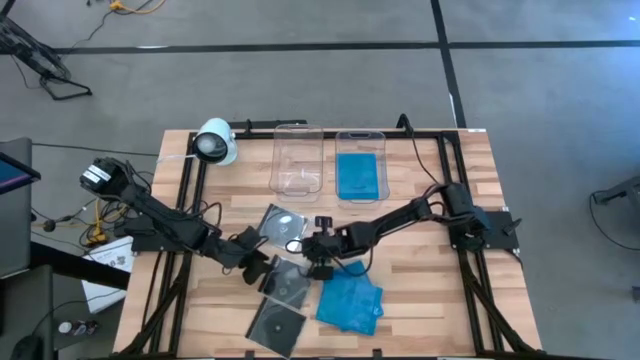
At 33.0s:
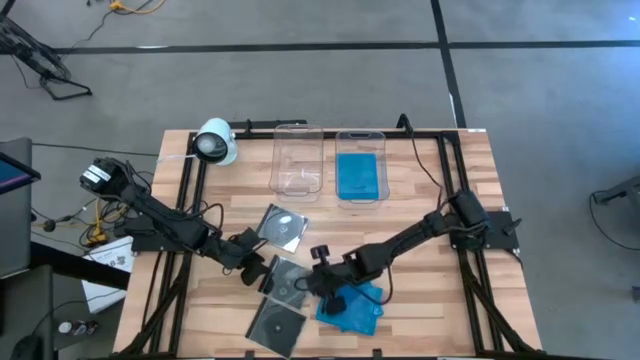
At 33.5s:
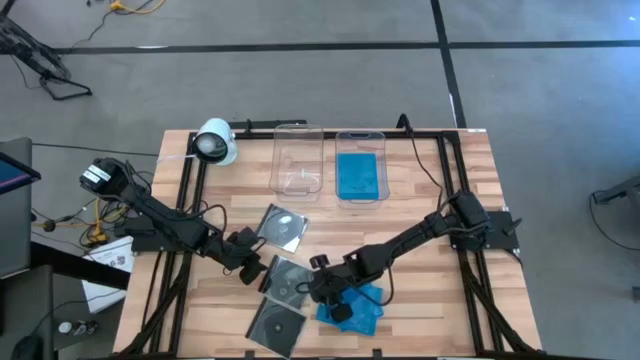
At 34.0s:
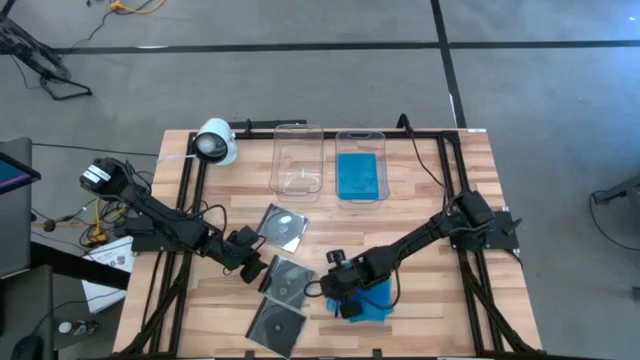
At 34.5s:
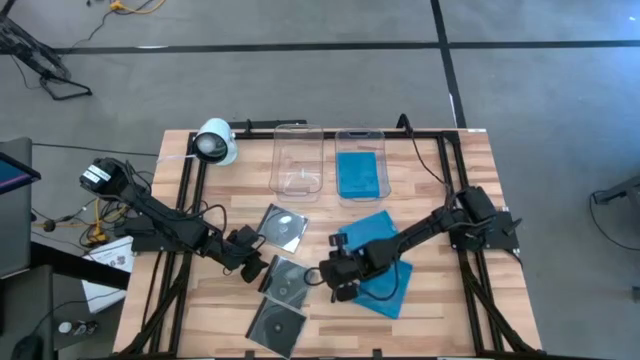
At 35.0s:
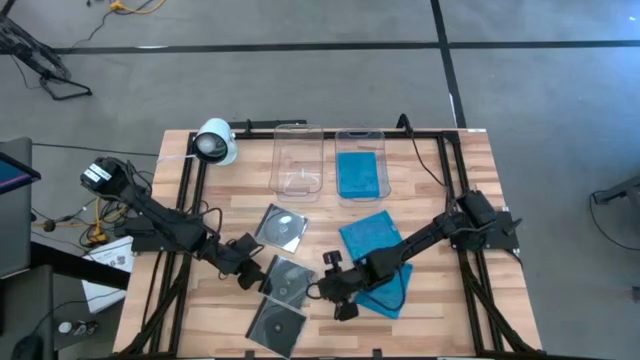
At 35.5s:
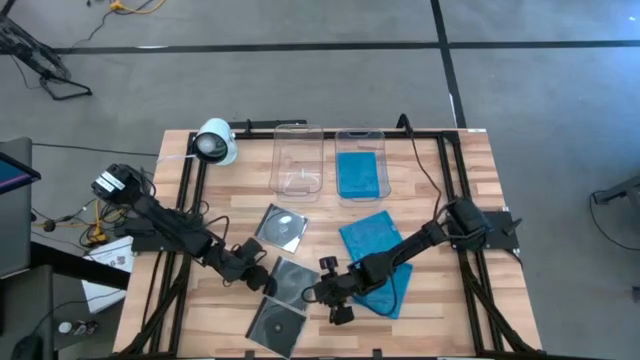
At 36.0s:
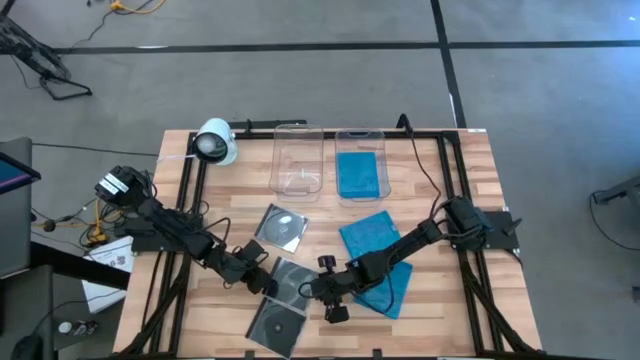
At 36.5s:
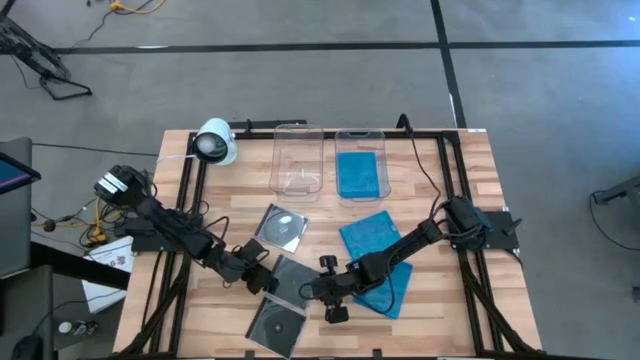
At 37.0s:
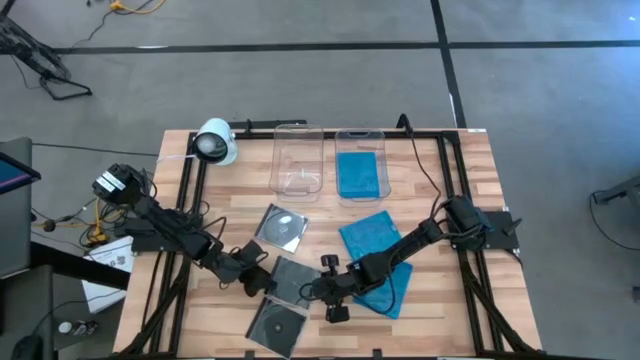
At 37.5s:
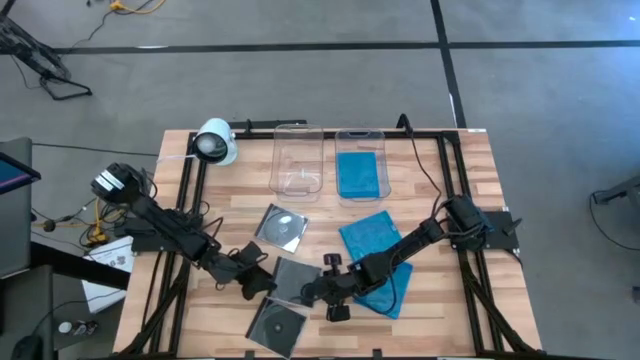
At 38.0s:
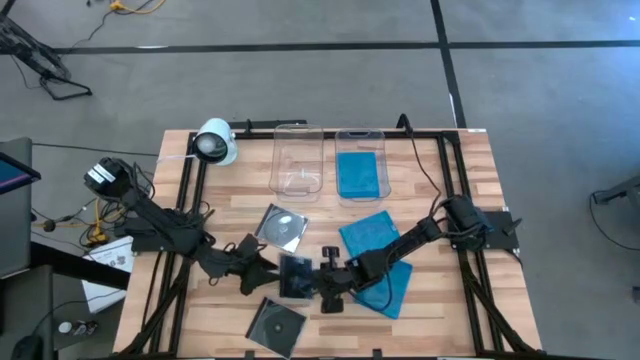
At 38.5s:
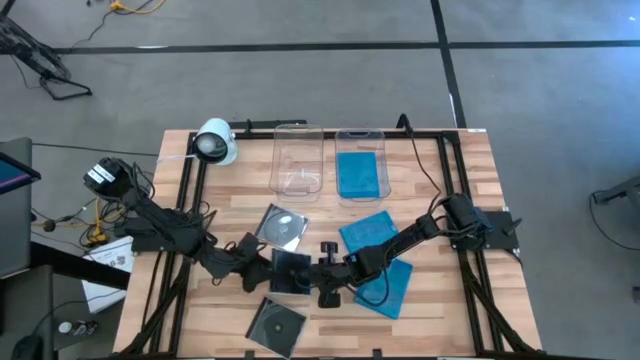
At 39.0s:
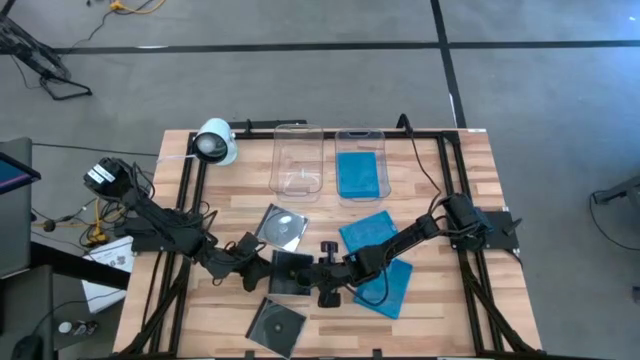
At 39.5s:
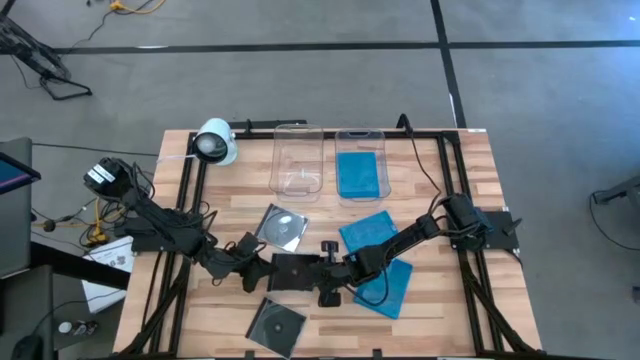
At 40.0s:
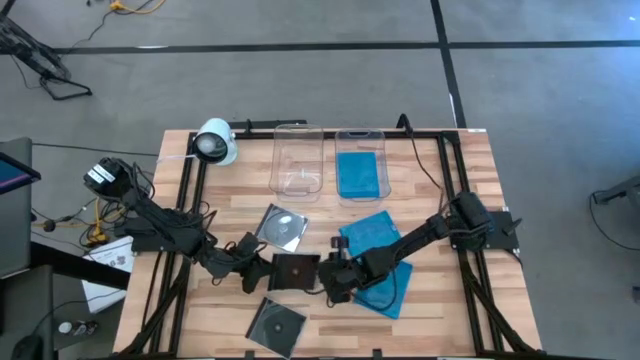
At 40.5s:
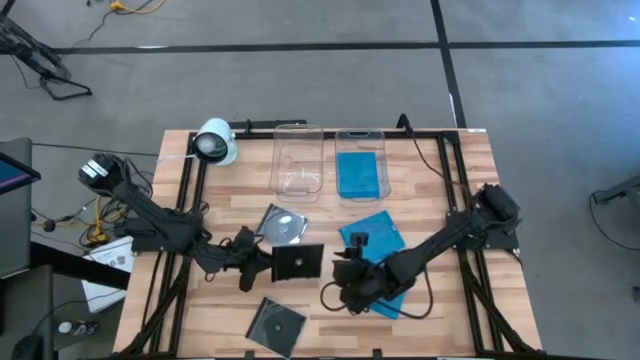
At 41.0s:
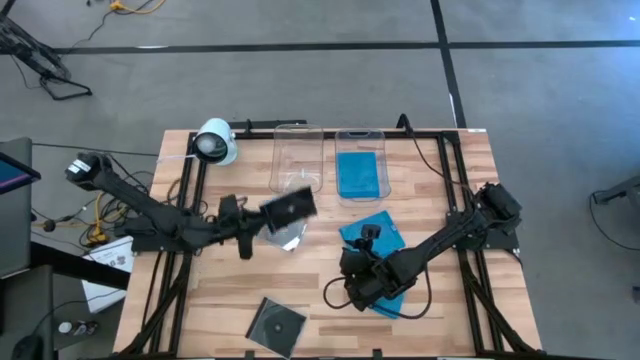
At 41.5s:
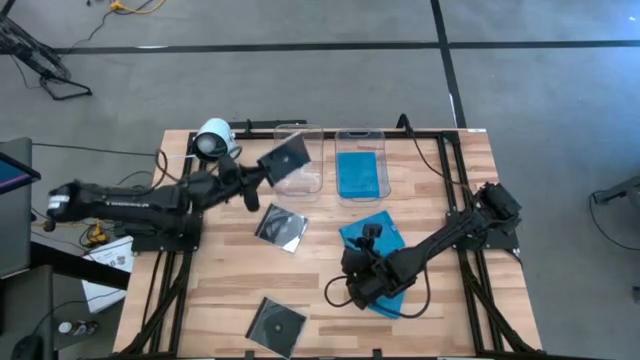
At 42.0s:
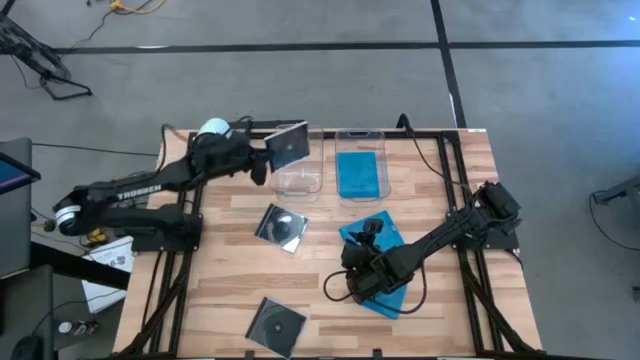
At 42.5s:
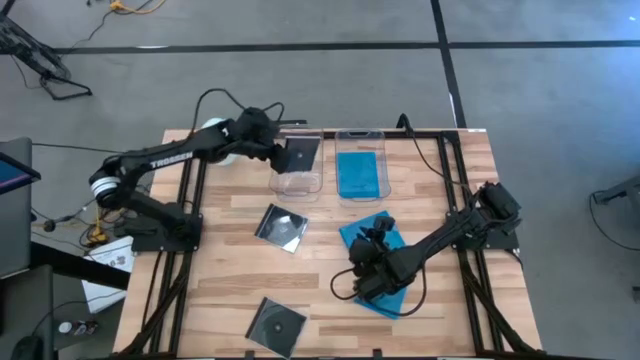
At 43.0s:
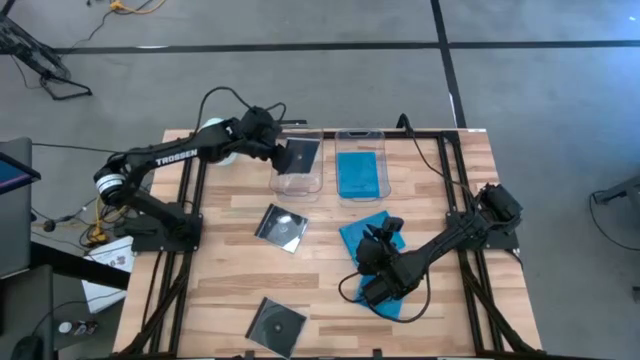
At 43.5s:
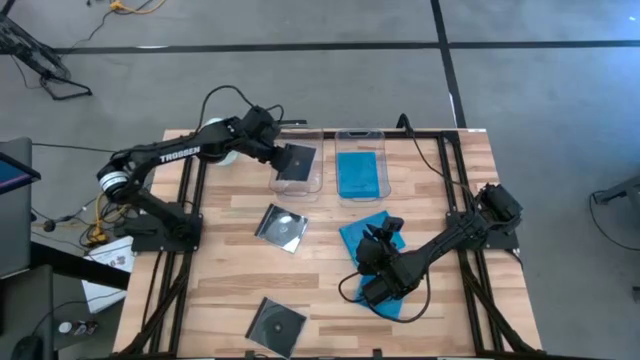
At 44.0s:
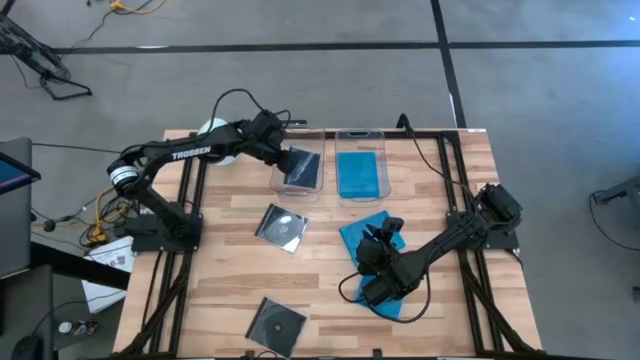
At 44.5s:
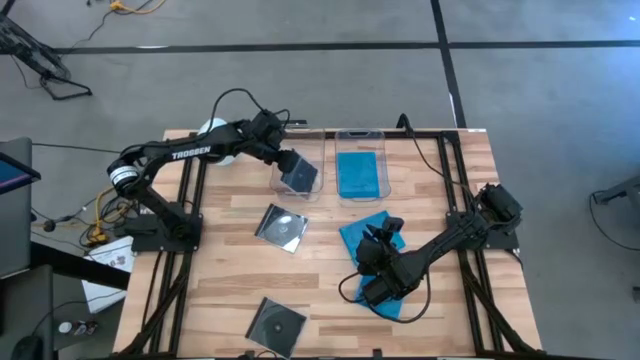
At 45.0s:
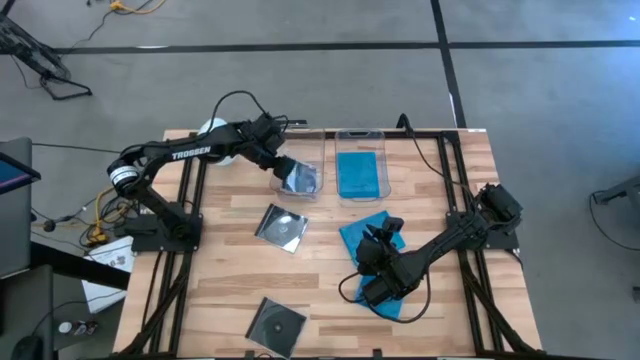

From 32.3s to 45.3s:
Task: Pick & place jewel cases by type
Put the middle black CD case into the left transparent bin

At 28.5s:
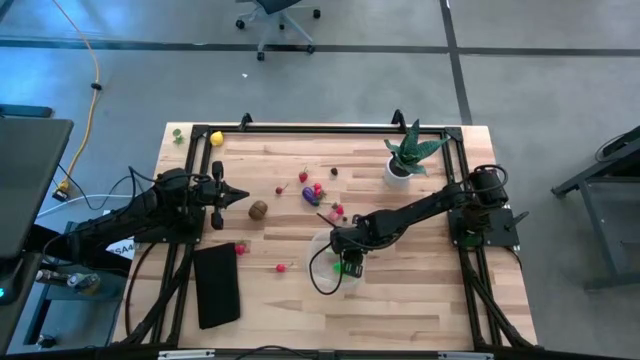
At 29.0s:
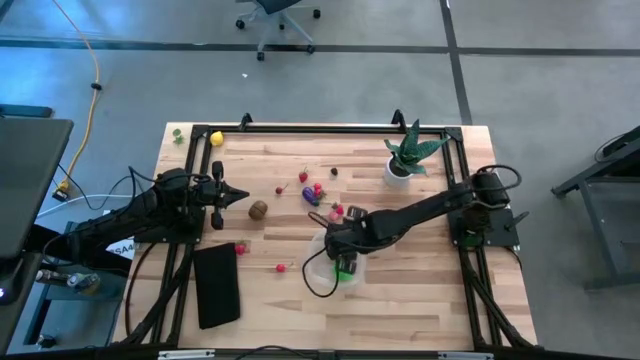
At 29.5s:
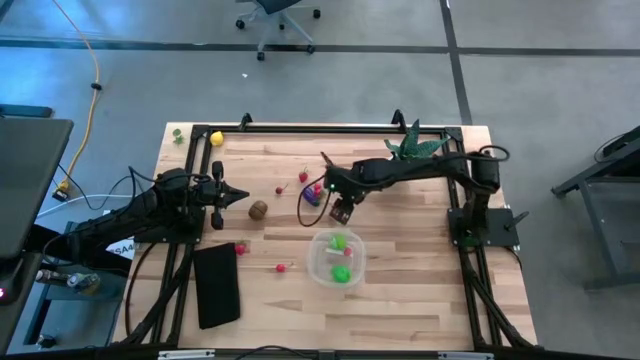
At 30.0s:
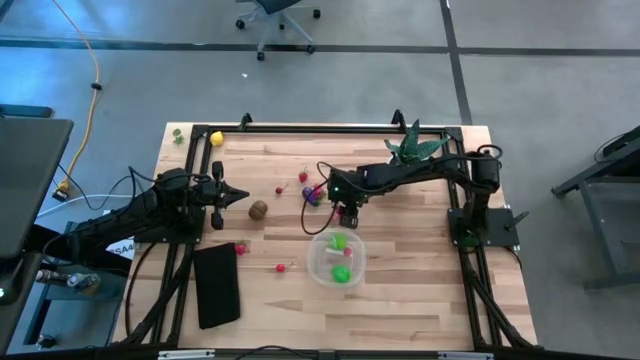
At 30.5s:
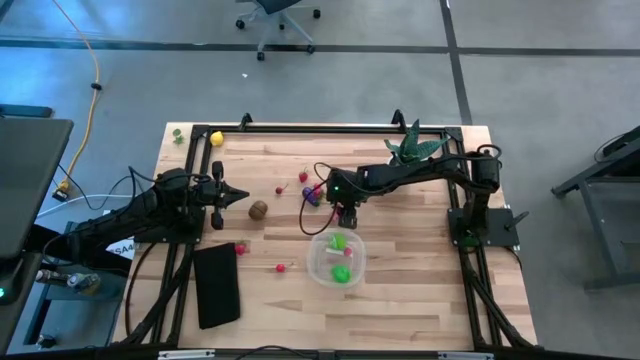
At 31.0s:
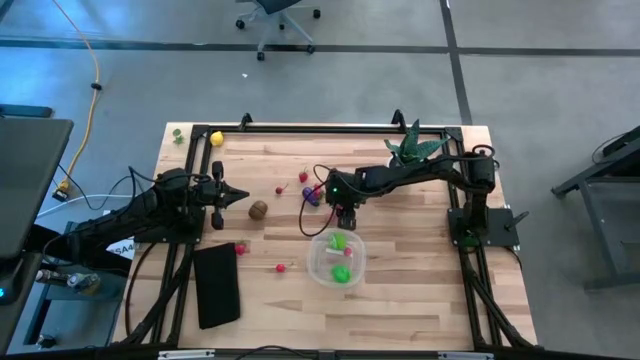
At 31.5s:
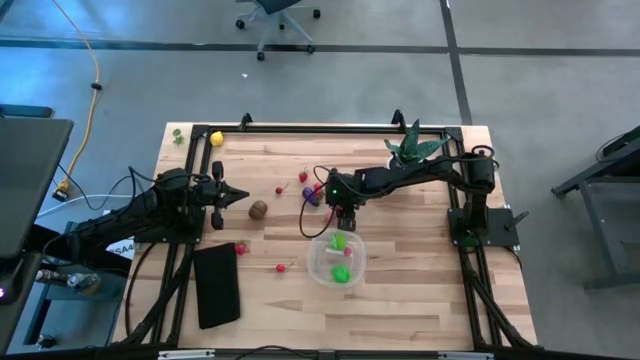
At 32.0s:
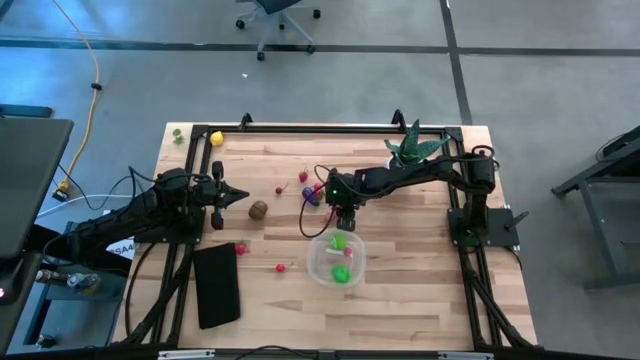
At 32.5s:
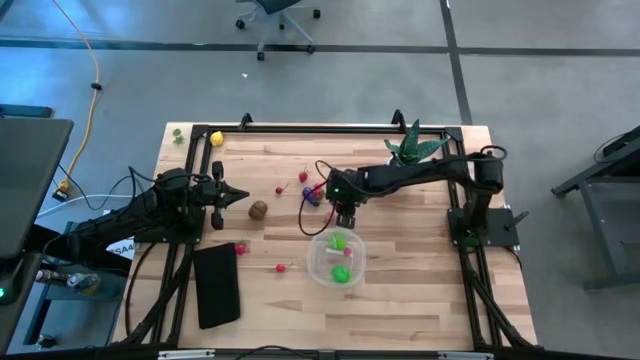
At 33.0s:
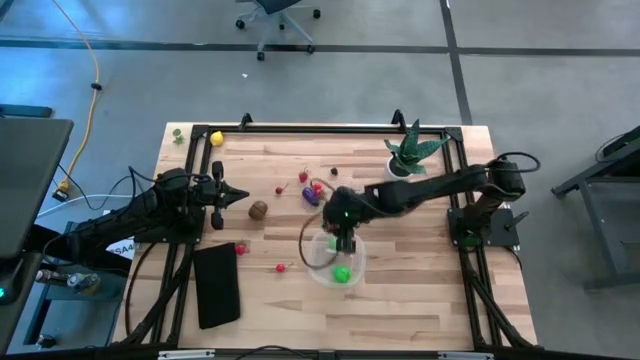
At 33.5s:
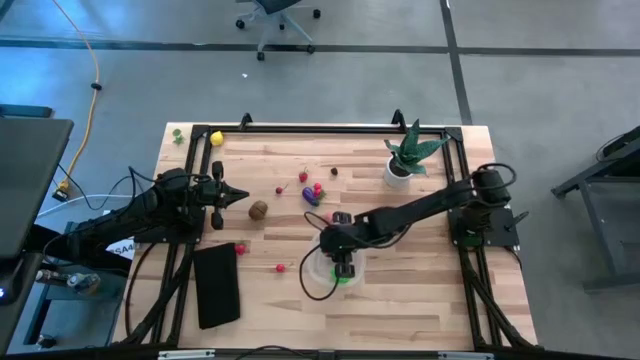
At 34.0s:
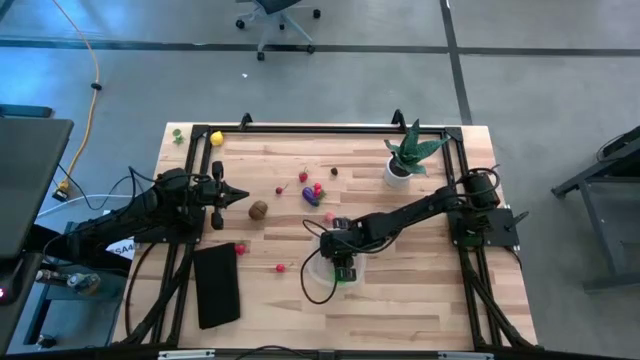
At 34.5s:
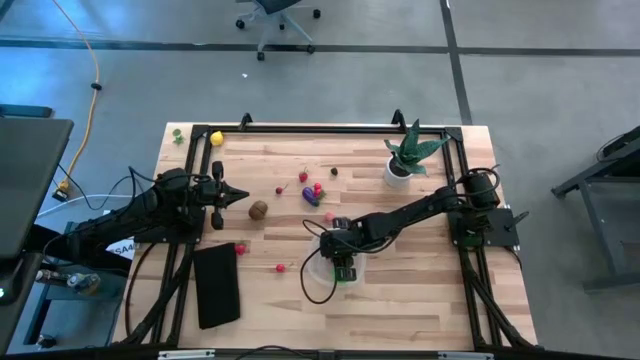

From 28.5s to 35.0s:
Task: Pick and placing Produce into tupperware
Put the red strawberry into the transparent container

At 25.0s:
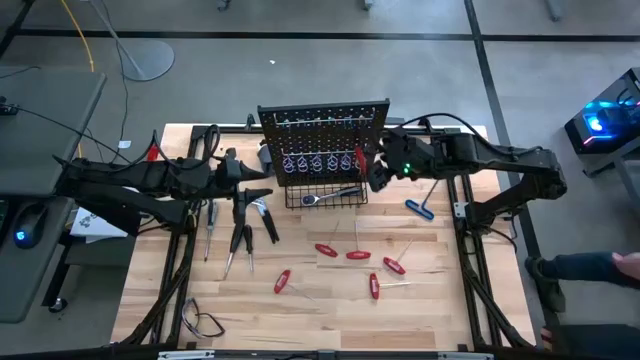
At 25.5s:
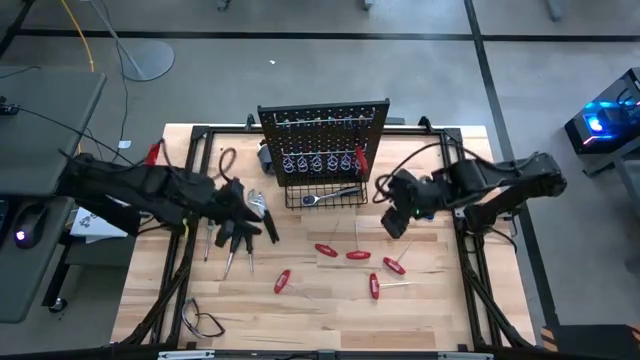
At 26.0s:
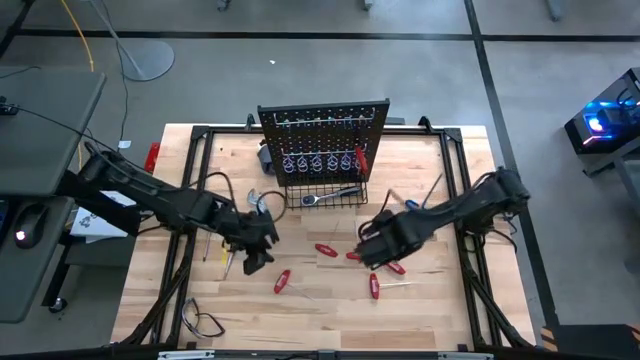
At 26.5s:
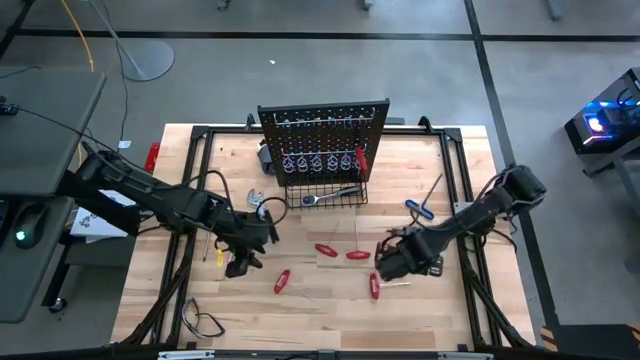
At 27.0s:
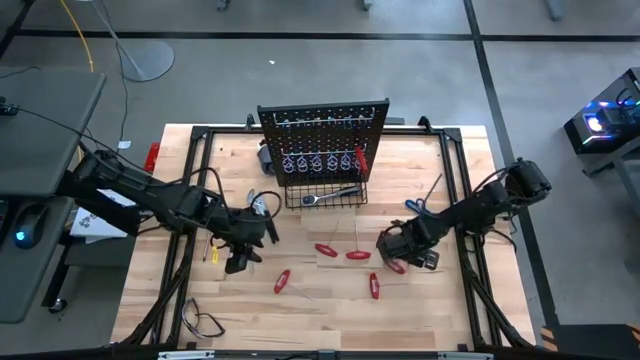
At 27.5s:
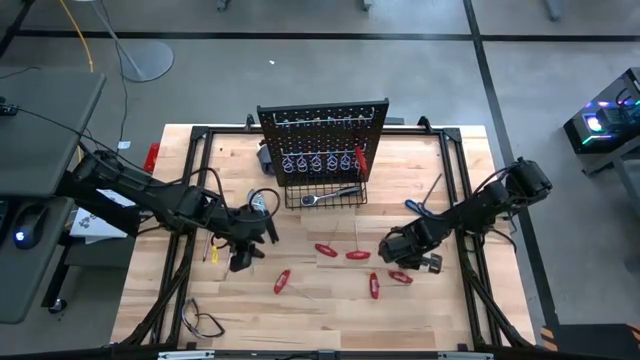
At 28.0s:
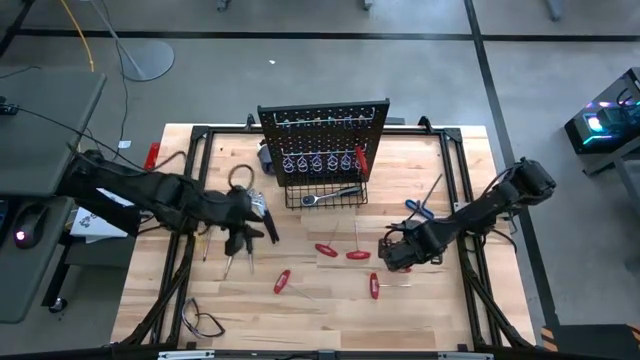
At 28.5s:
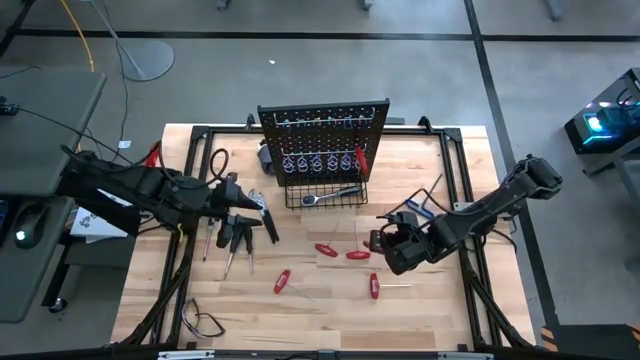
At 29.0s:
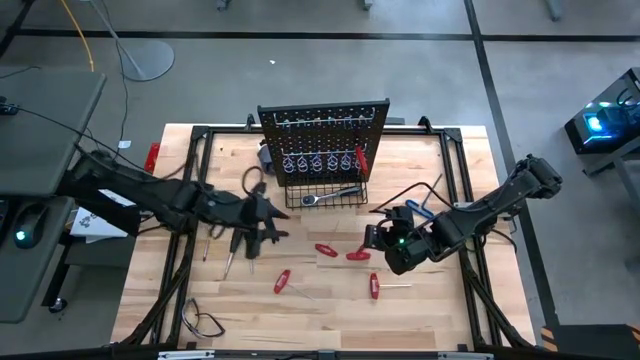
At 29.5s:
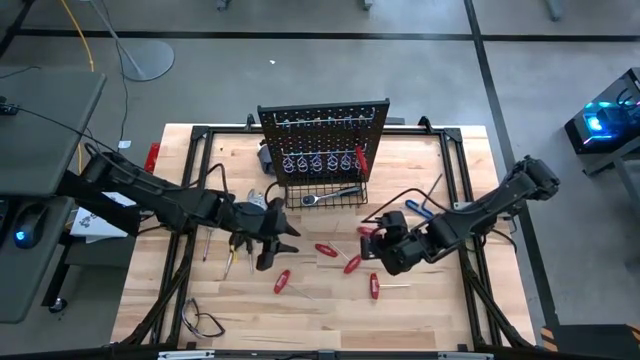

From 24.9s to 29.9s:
Task: Hang tools onto peg board
Hang the red allen wrench on the peg board
